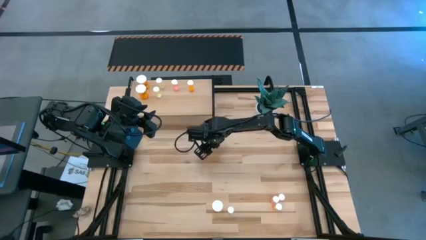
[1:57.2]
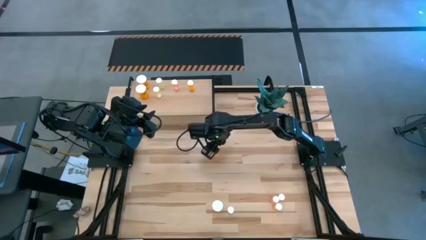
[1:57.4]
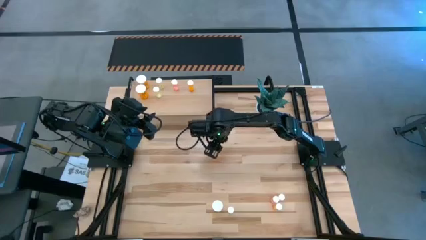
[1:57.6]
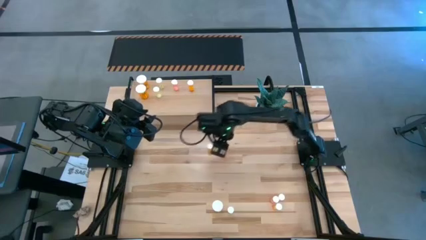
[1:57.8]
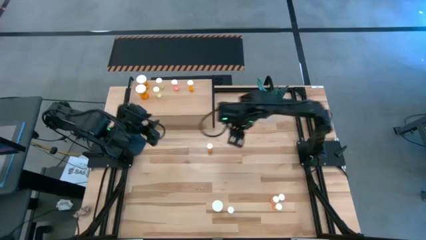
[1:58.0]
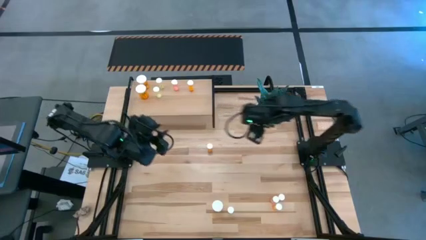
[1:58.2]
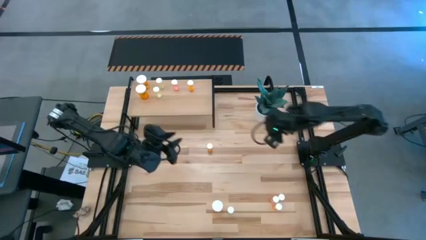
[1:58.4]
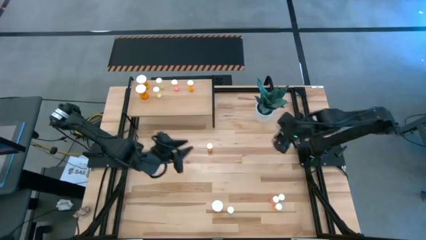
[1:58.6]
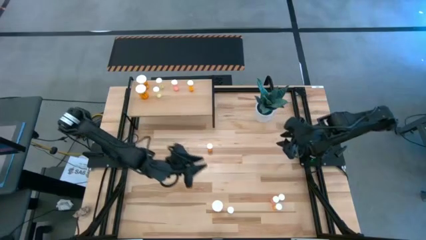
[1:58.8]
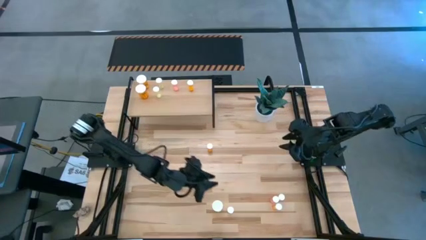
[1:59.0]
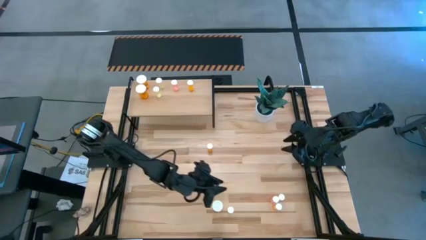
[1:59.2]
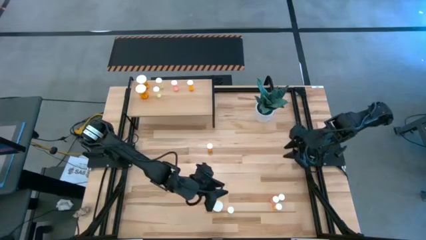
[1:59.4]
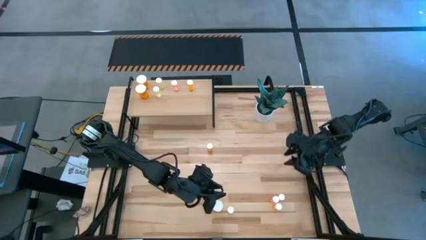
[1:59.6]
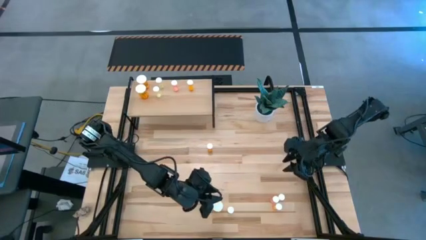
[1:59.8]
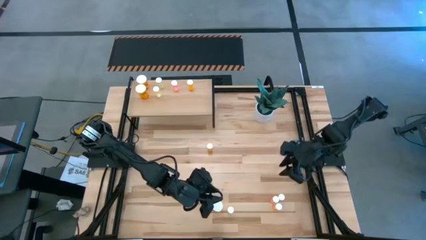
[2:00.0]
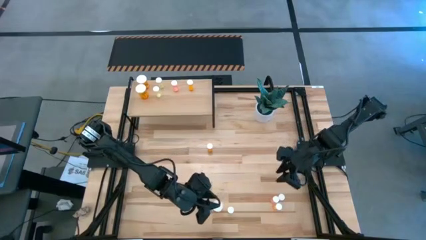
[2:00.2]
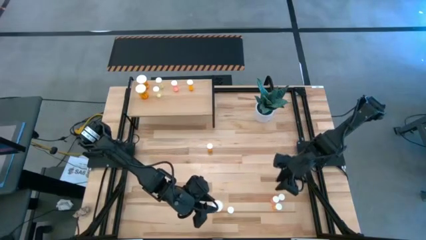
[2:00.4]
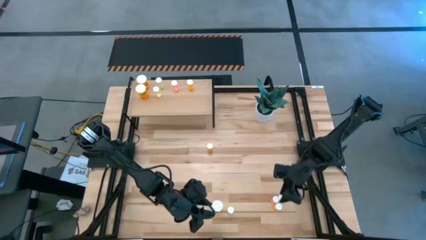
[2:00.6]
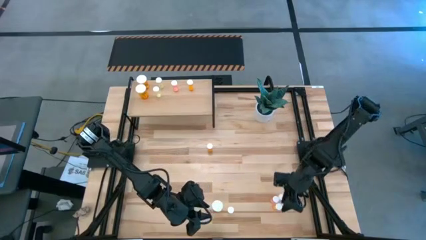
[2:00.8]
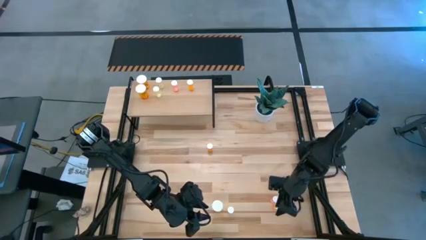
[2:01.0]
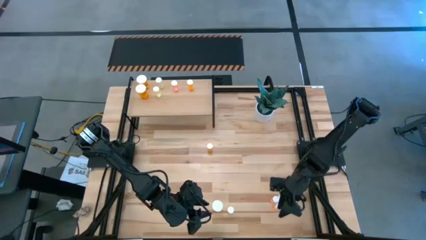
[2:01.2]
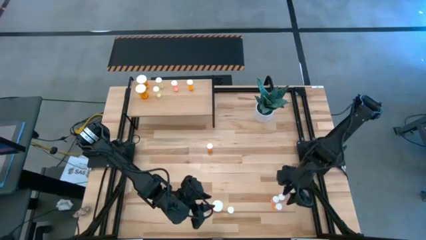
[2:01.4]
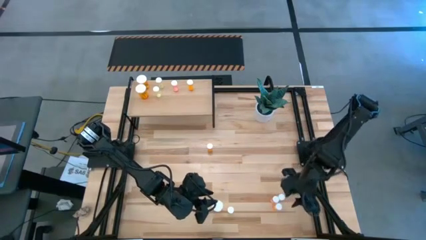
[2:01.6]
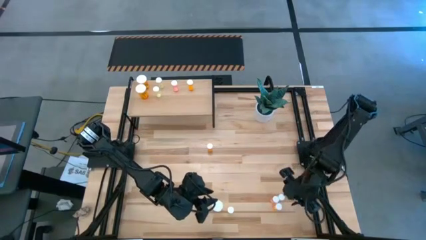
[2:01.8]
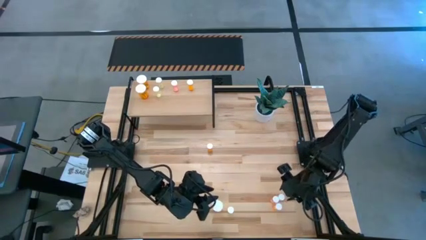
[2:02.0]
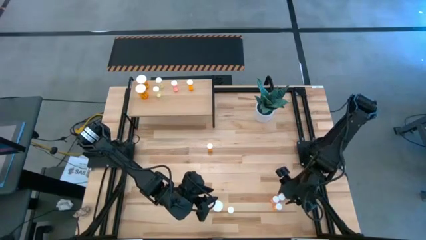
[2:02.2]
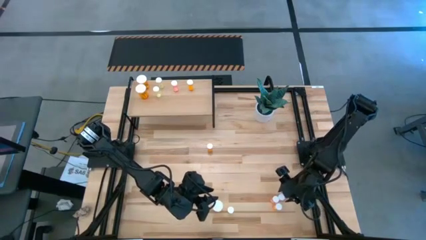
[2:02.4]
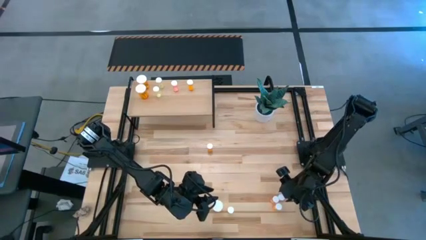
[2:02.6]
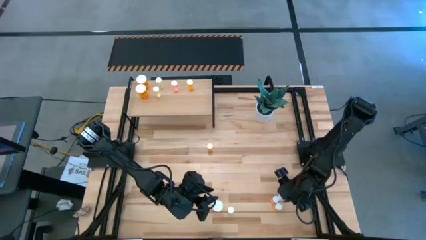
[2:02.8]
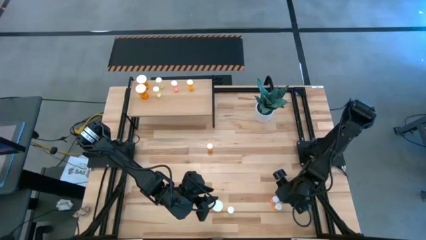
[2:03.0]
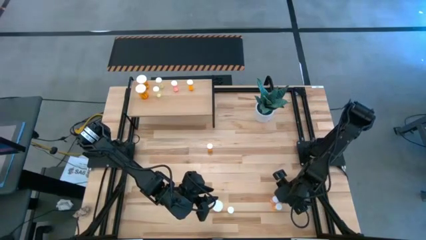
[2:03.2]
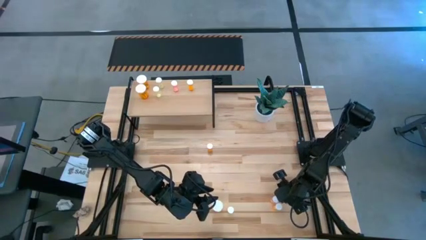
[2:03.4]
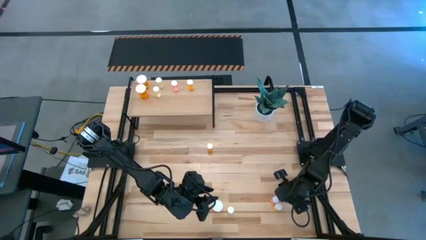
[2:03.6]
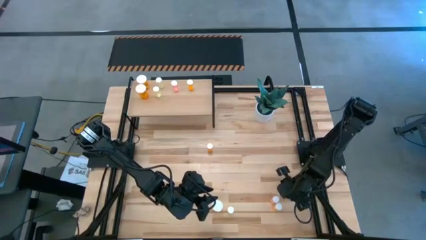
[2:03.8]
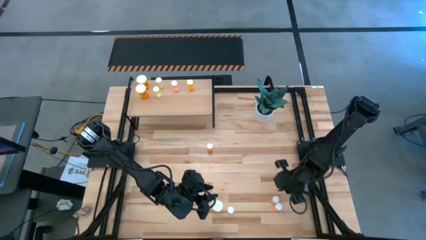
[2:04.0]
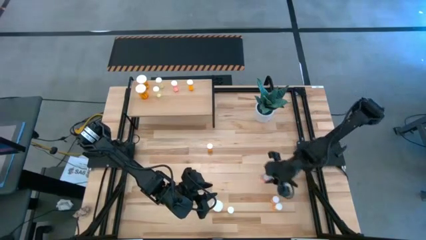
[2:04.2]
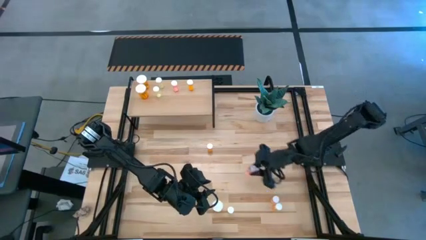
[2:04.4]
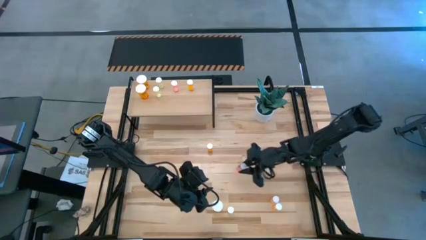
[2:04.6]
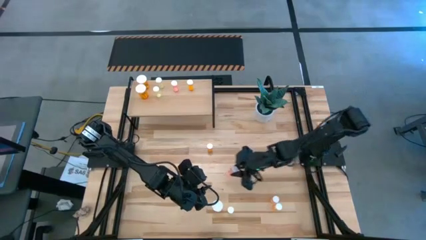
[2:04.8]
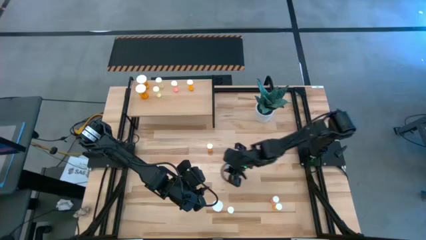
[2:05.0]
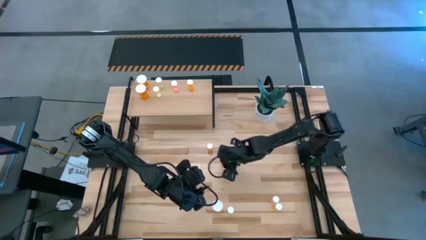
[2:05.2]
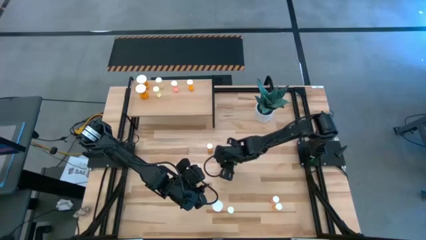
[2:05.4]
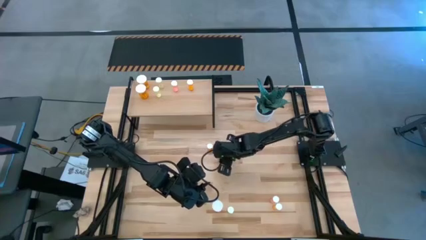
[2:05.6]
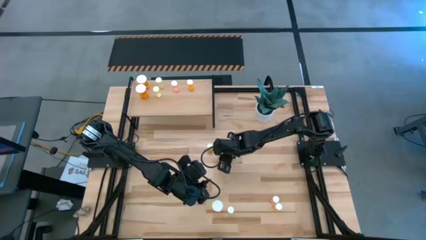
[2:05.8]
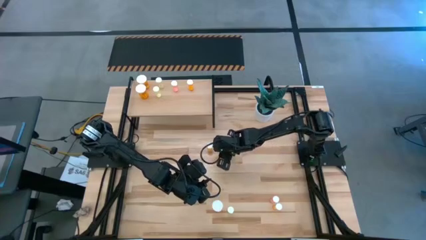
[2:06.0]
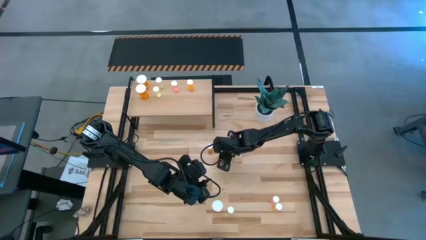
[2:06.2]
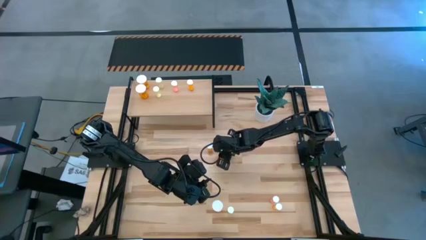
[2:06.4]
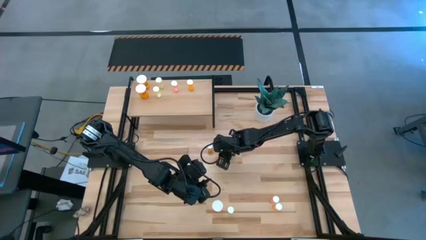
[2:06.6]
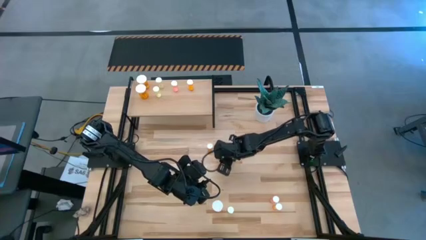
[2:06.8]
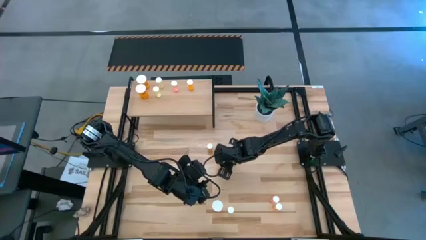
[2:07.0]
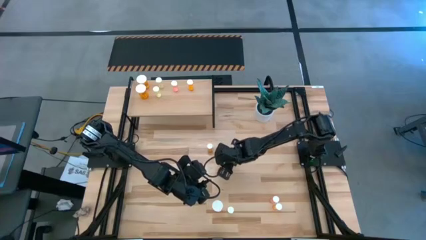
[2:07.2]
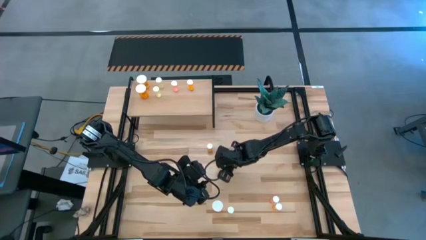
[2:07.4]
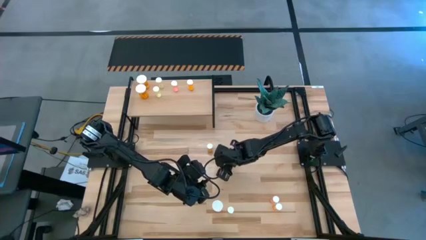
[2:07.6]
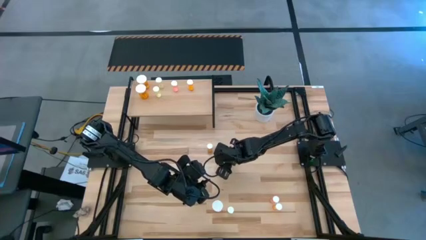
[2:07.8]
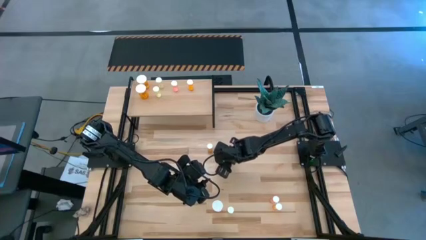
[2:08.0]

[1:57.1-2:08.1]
Task: Pick and place medicine bottles onto shelf by color
Put the right pink pill bottle on the shelf aligned with the other pink pill bottle
